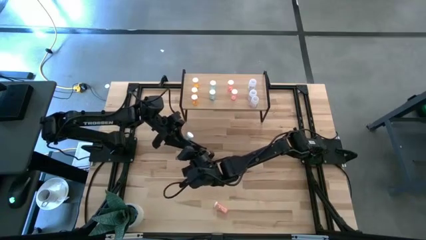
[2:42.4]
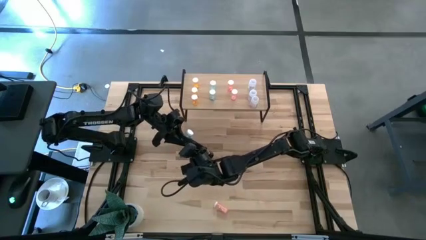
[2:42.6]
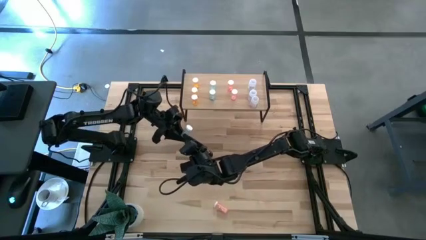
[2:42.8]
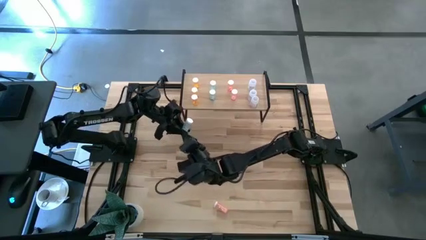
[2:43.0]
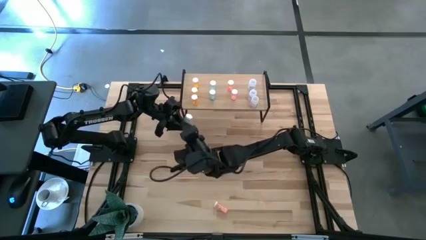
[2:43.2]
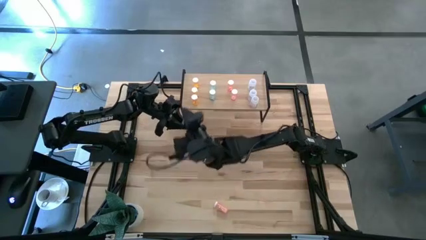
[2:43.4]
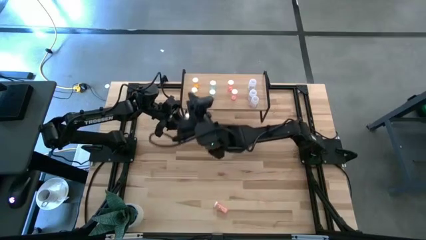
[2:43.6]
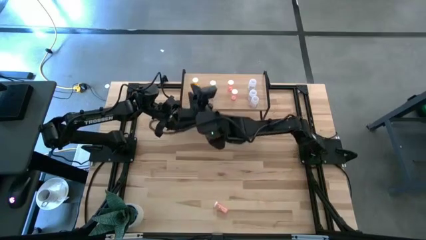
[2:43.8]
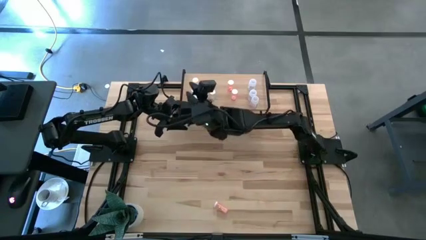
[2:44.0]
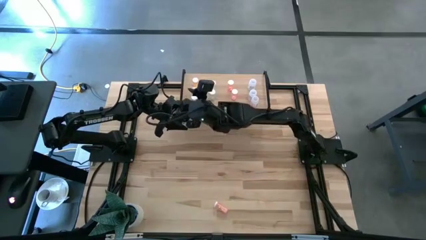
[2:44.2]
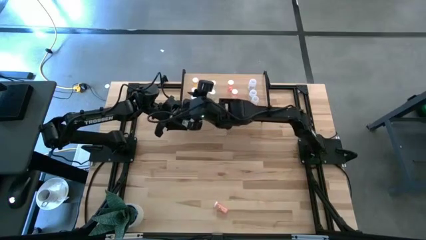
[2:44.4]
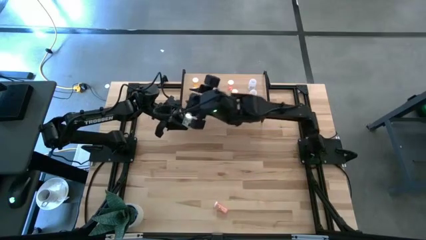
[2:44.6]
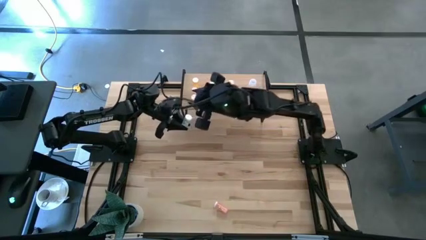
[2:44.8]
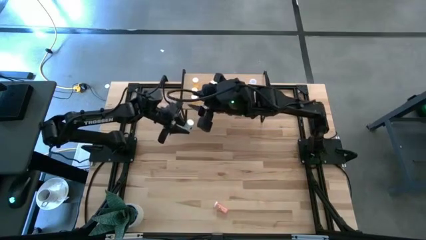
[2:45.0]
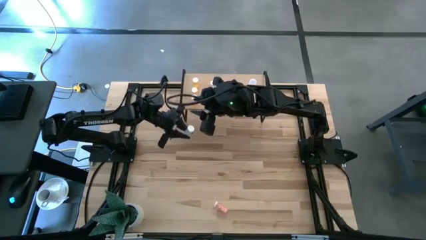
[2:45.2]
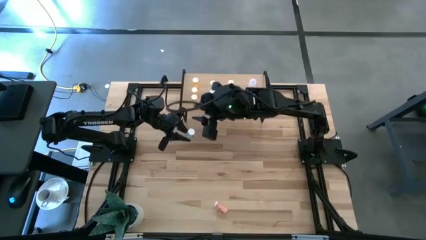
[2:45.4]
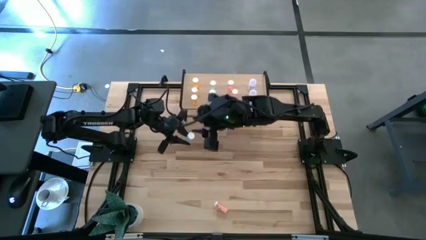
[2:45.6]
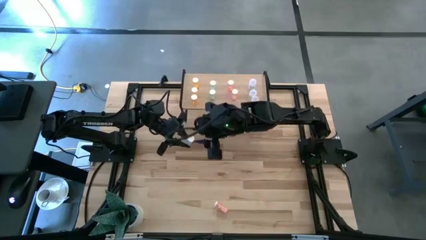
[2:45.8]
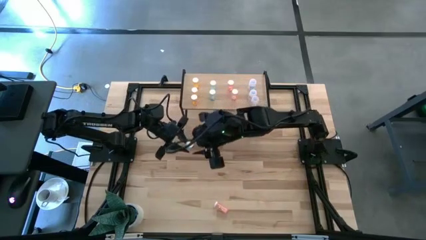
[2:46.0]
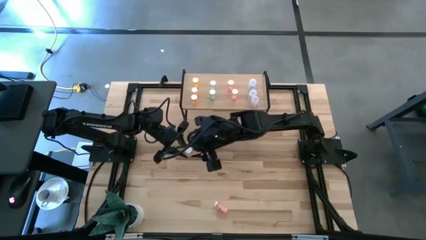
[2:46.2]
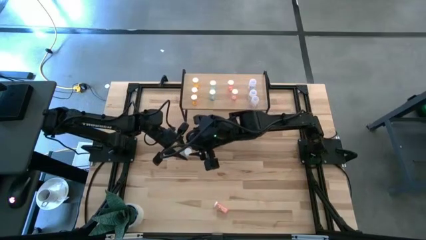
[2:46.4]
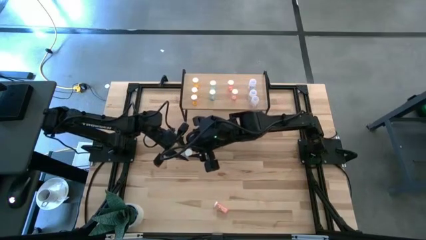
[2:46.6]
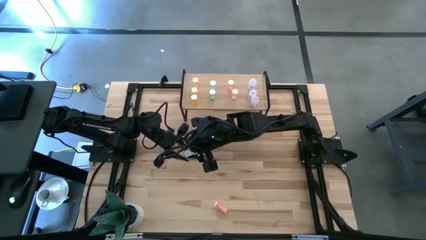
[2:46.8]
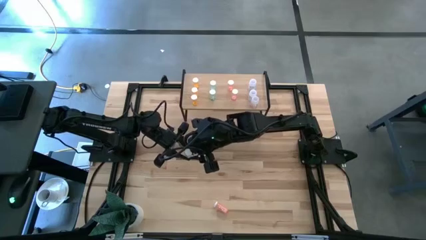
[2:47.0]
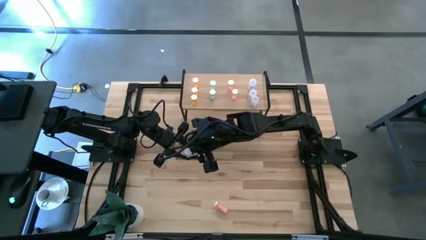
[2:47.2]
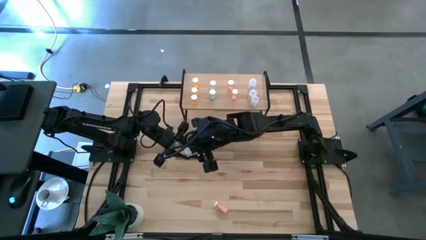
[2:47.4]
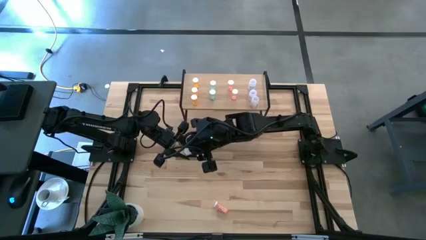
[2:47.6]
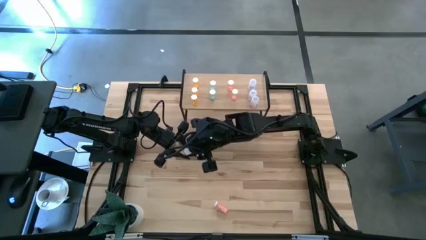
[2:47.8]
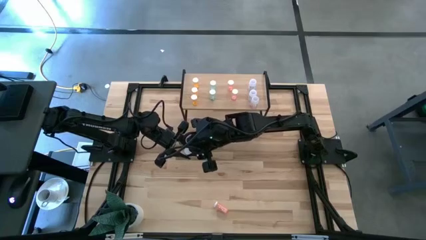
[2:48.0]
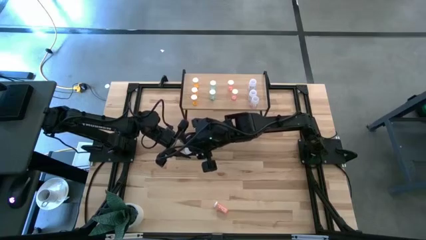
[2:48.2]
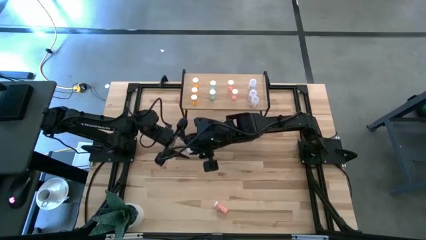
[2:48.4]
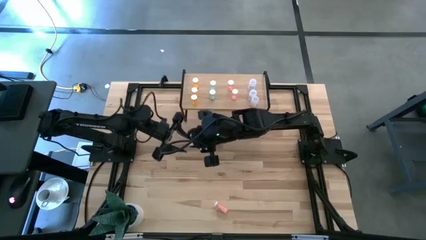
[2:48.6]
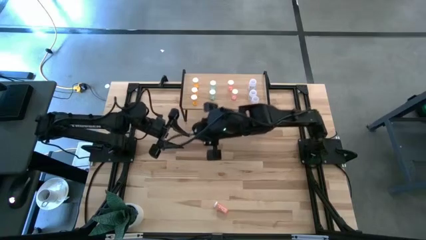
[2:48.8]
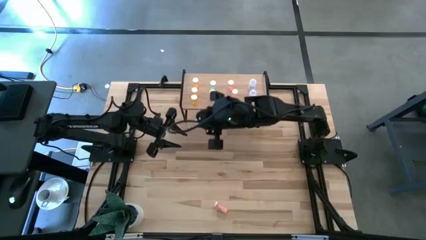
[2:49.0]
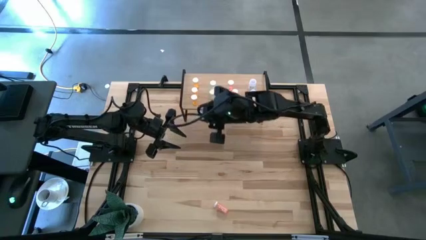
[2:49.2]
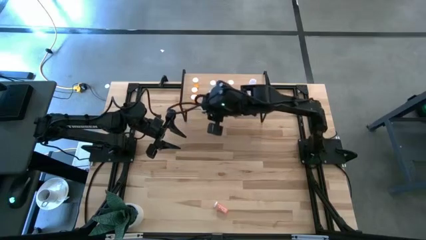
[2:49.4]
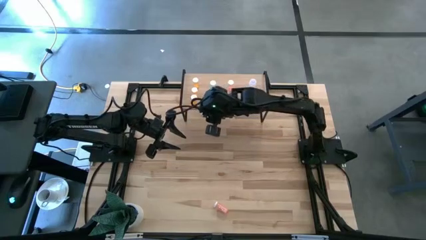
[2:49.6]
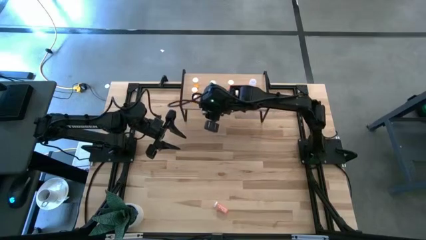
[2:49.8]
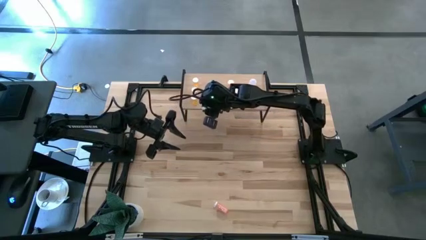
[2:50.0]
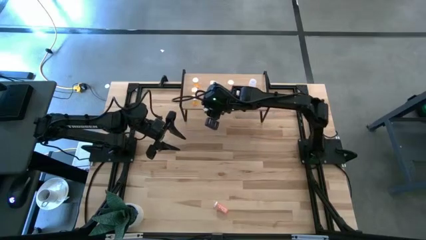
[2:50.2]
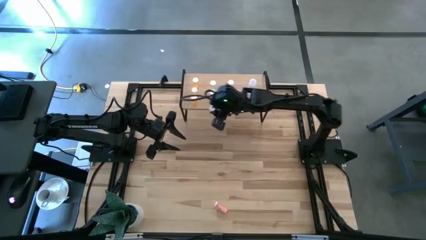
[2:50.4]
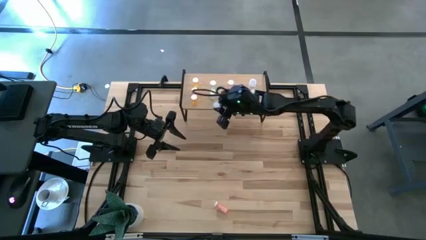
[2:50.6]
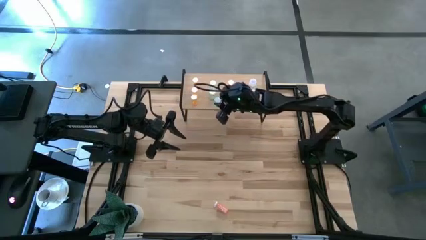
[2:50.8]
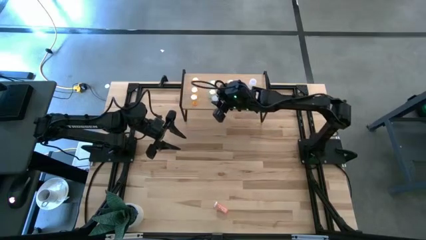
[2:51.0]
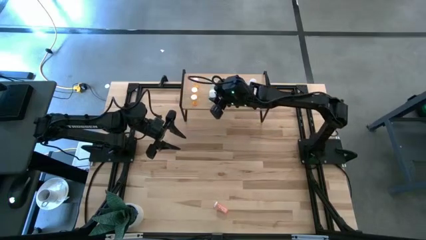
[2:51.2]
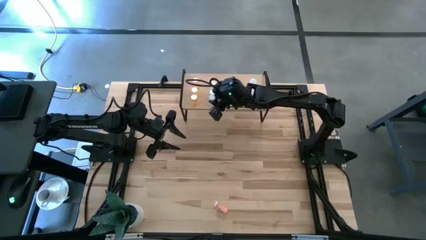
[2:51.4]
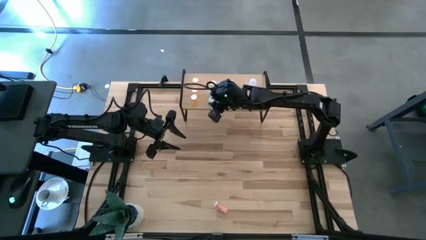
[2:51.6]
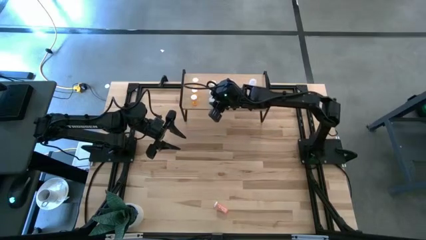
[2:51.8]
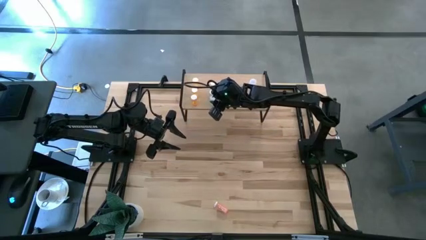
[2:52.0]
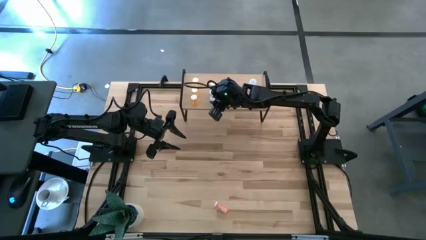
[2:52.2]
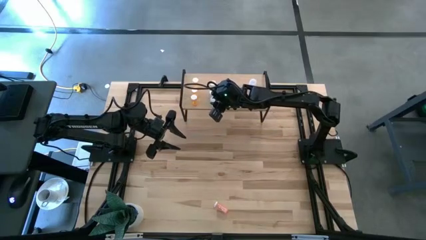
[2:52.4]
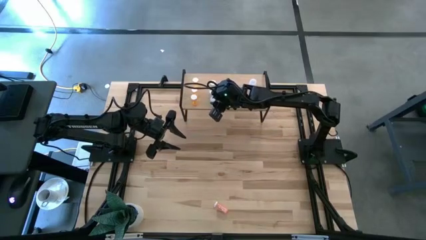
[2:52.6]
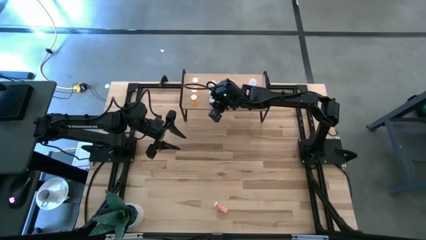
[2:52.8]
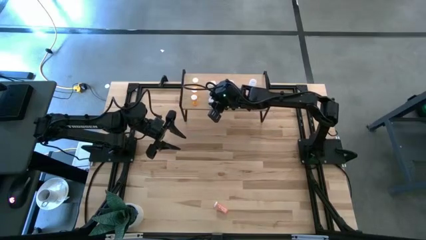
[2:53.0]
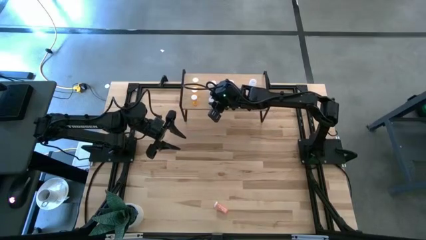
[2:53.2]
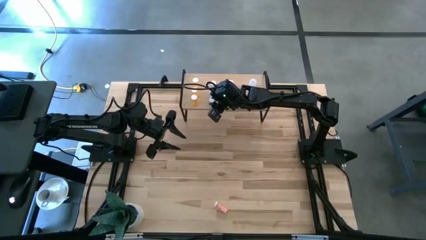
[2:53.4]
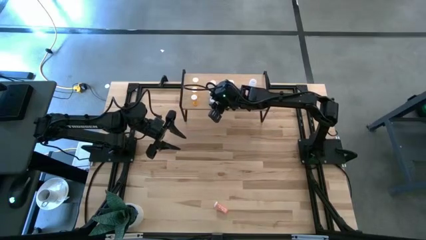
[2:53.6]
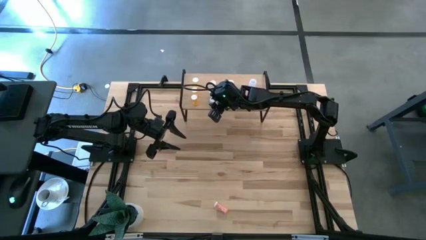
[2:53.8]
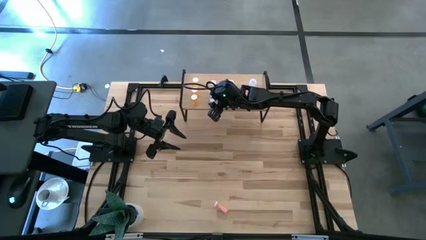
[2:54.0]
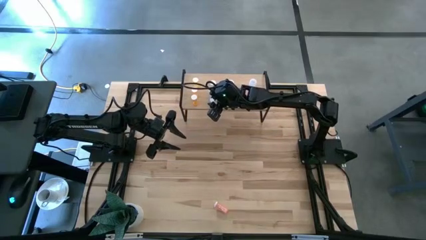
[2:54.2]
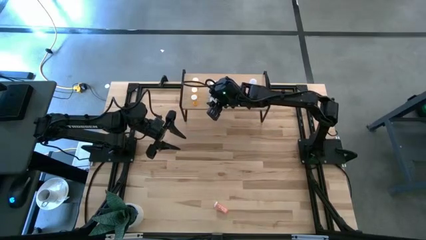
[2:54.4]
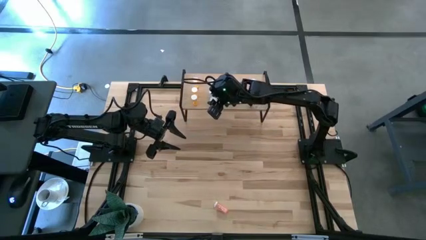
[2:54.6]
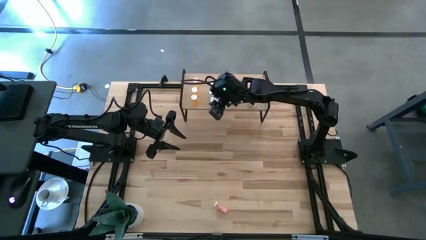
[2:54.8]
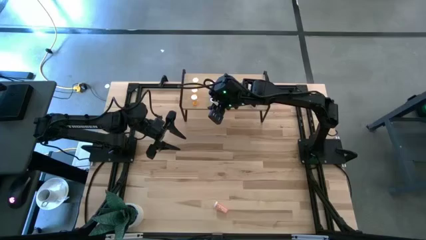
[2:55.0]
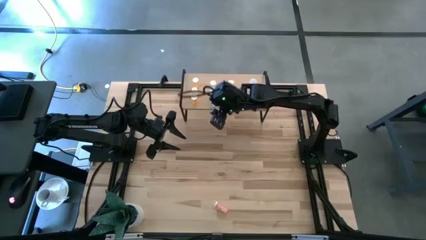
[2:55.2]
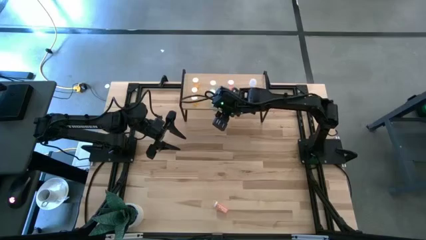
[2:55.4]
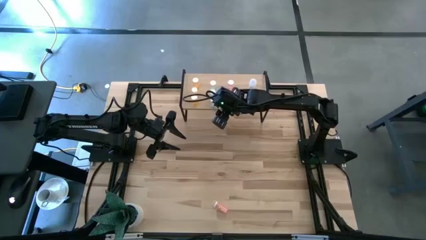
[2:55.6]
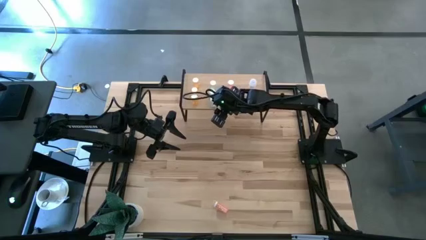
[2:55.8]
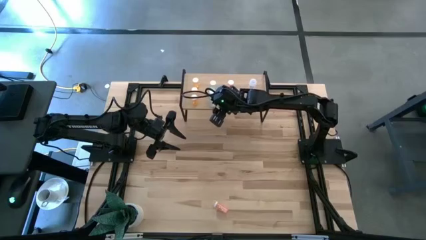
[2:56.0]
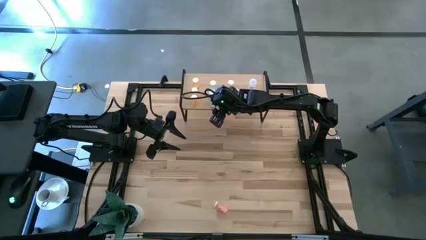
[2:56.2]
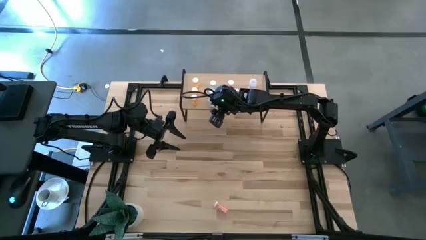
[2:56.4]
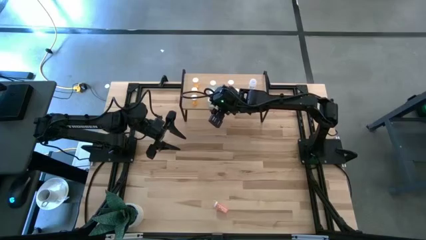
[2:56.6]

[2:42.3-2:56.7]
Task: Pick and place medicine bottles onto shelf by color
Put the blue pill bottle on the shelf aligned with the blue pill bottles
